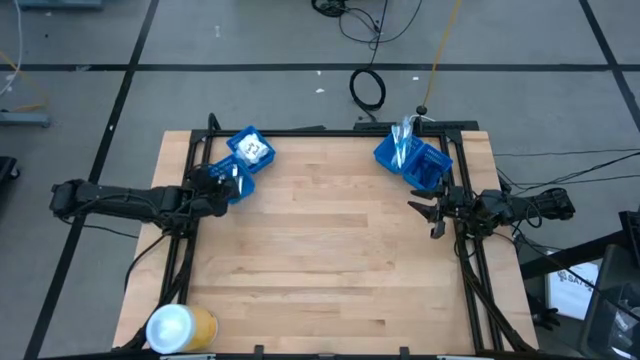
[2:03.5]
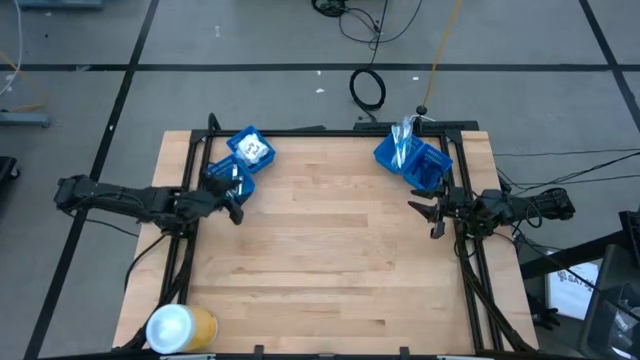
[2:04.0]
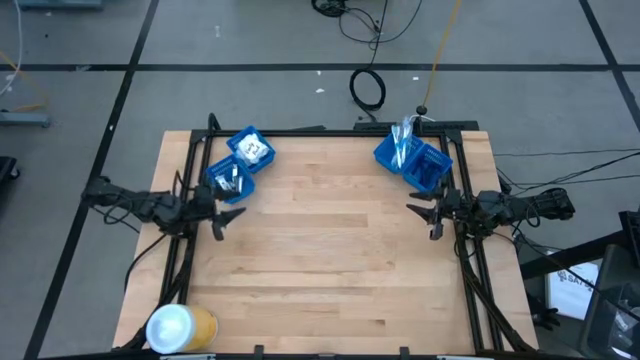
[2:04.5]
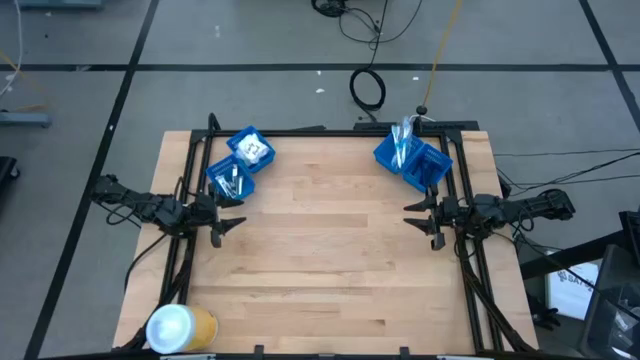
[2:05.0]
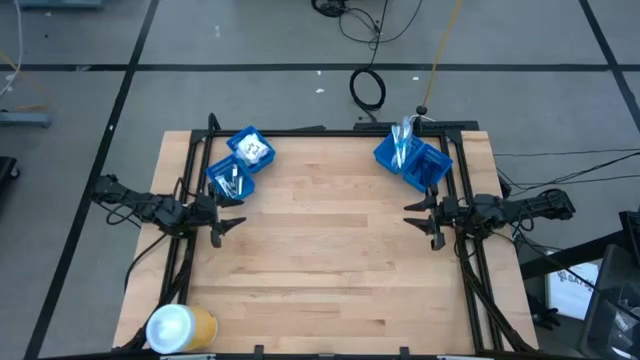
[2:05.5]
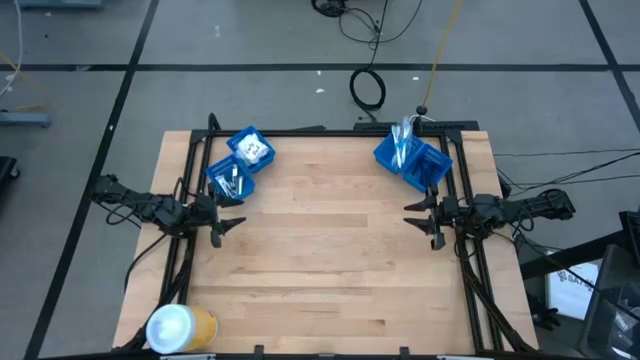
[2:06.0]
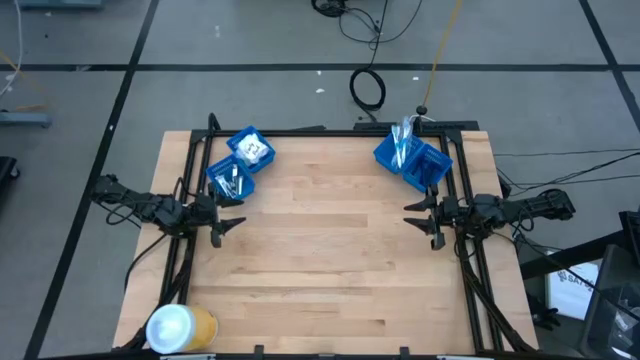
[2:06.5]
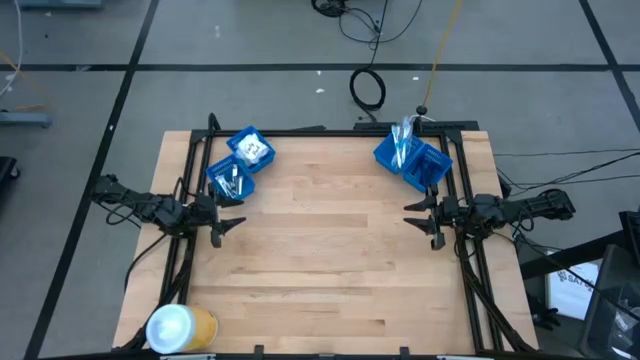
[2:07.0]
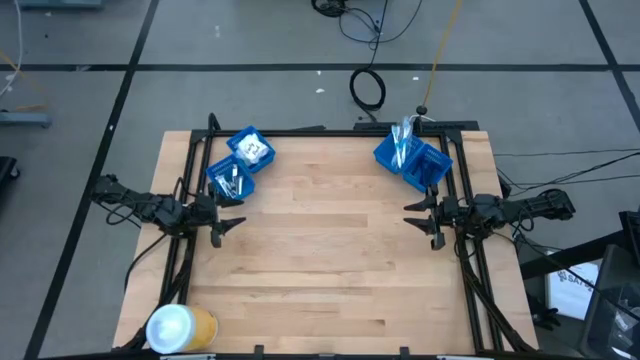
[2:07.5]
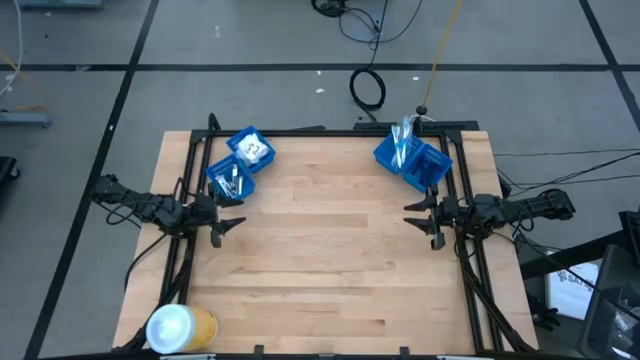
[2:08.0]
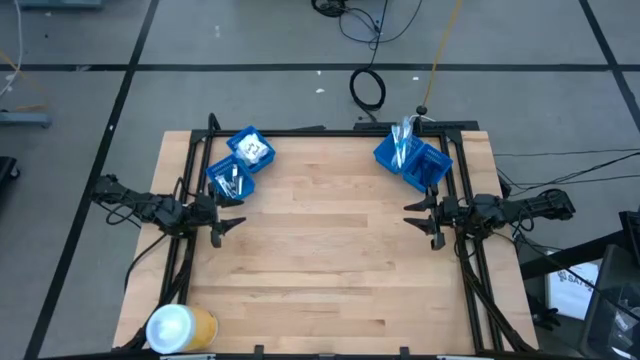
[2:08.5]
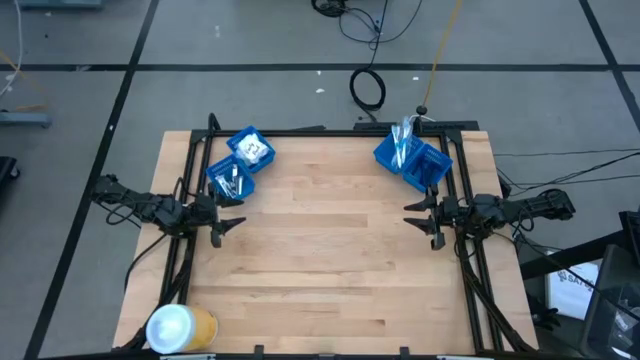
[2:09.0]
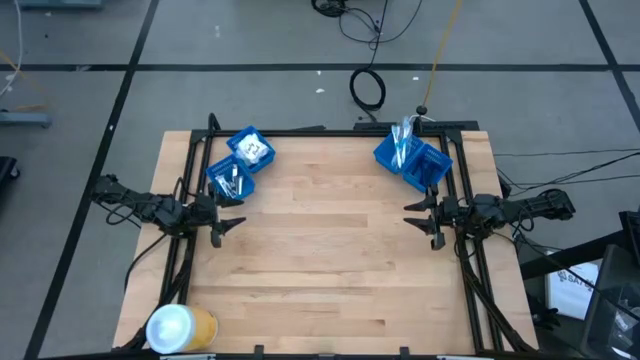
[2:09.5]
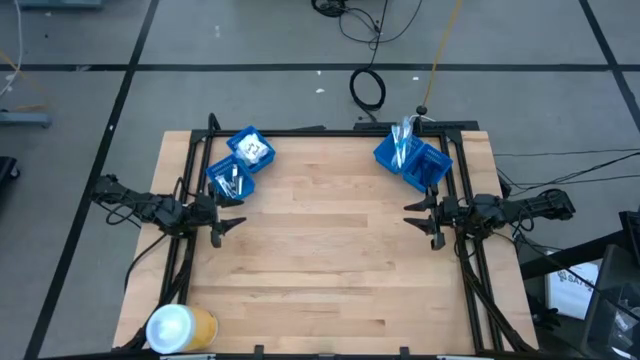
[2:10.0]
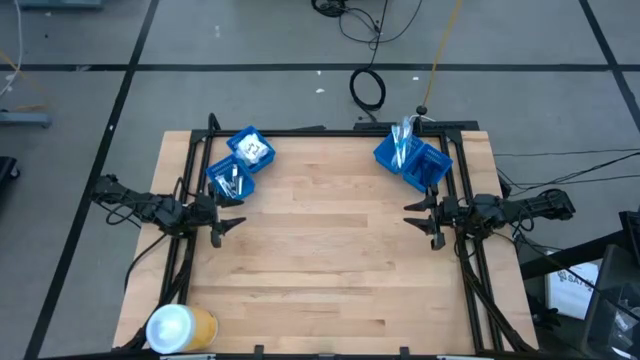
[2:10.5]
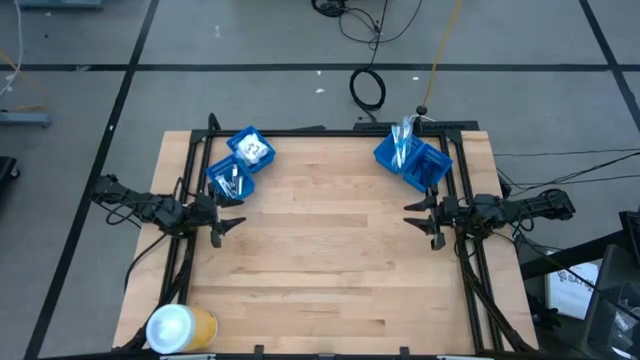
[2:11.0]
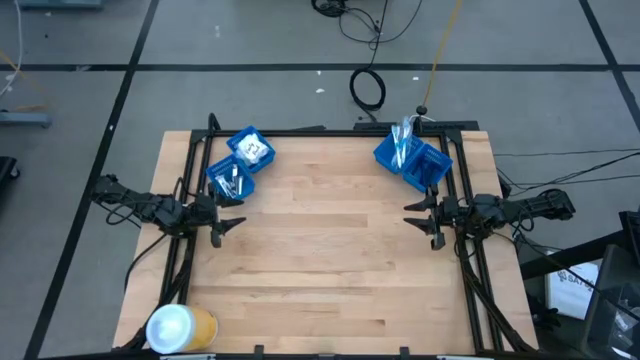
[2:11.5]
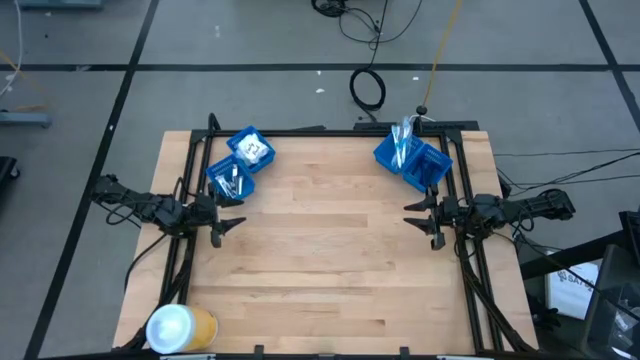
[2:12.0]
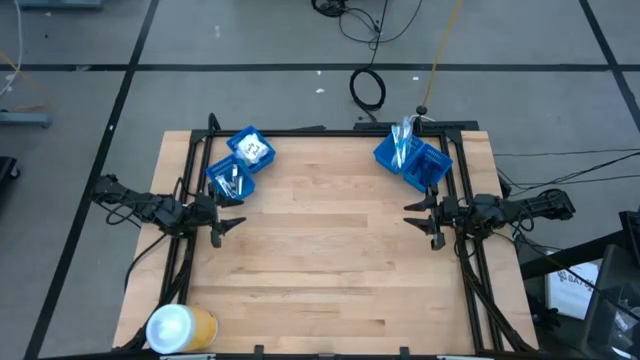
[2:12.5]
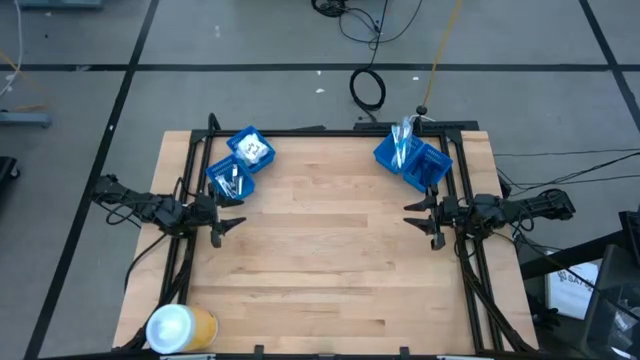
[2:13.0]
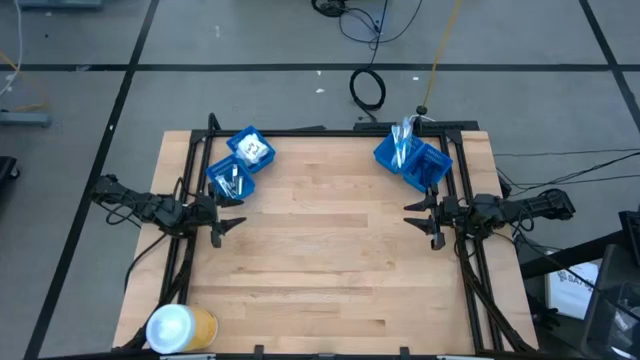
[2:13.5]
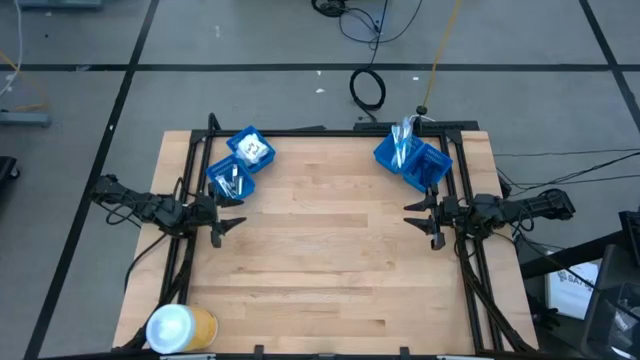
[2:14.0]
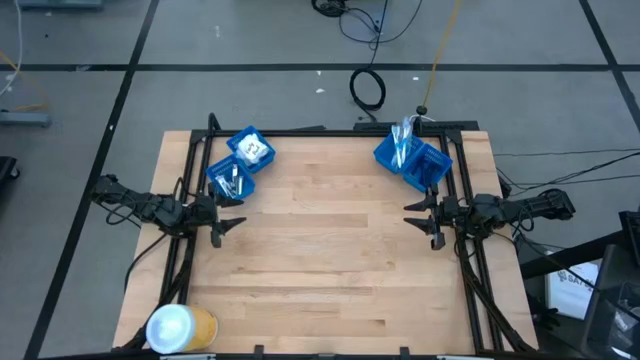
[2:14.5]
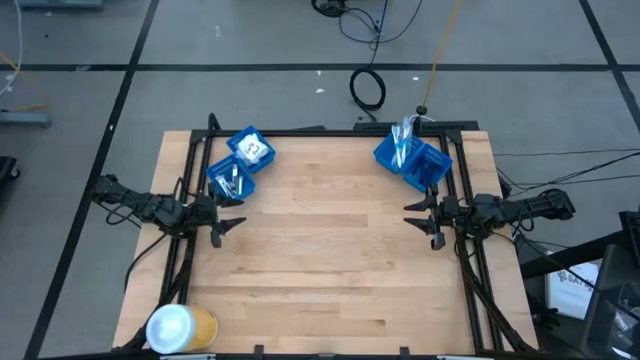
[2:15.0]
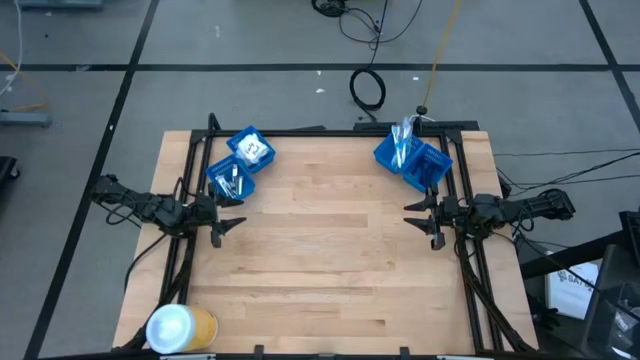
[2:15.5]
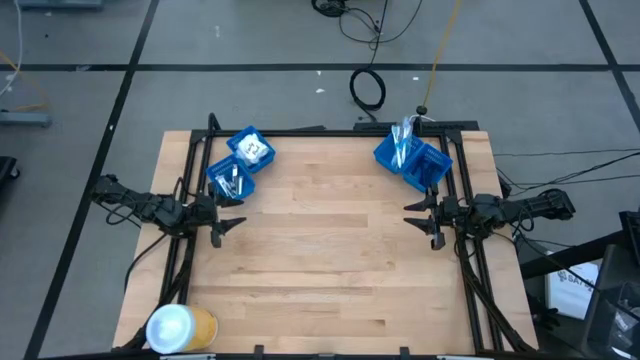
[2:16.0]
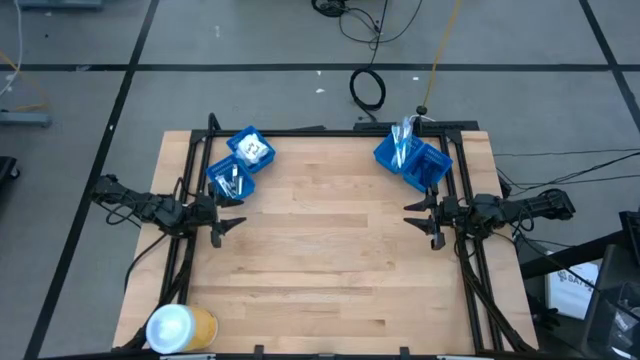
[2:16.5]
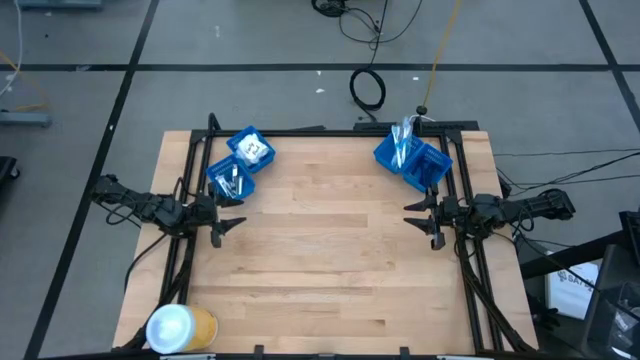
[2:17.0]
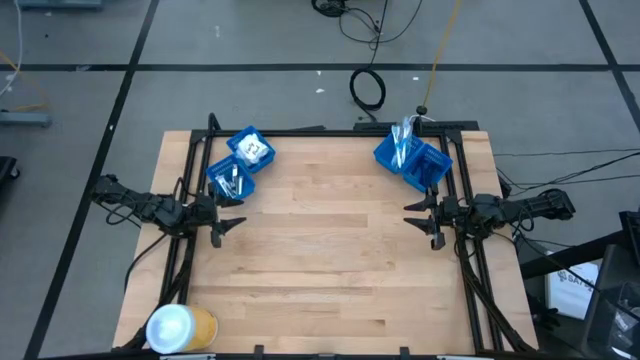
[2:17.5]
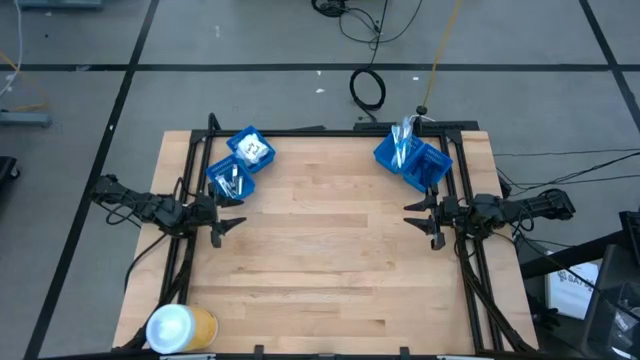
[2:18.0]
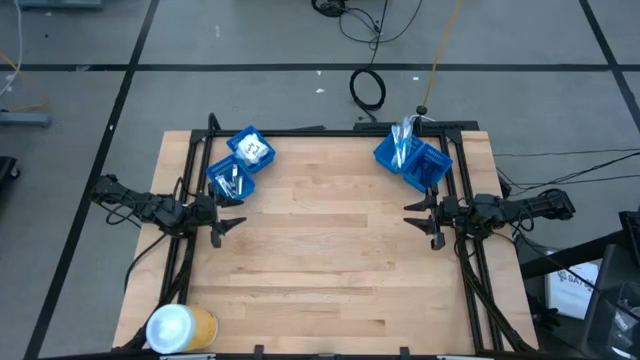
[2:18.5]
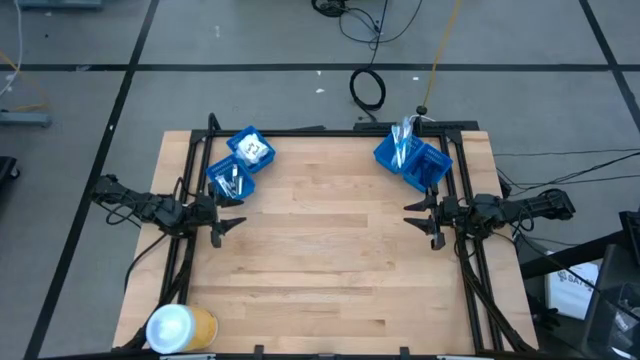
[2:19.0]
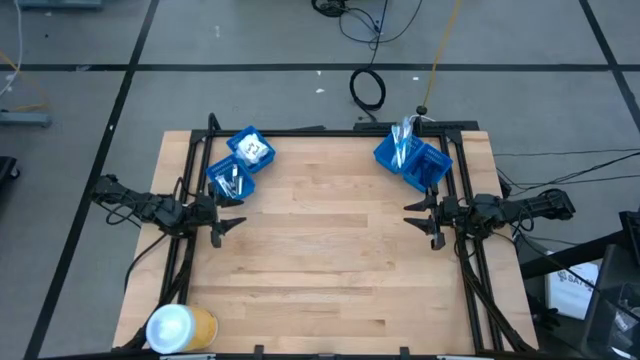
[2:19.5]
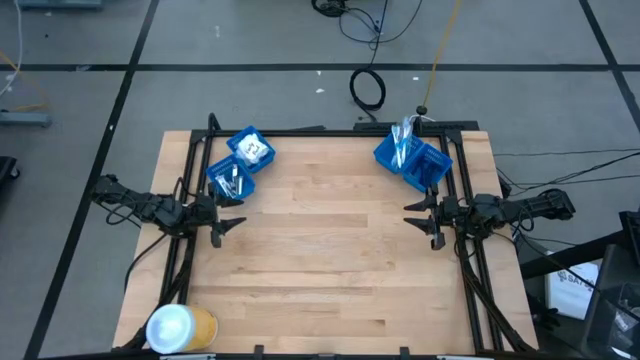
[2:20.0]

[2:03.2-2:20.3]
Task: Pick & Place Travel size toiletries
Return to Home Position

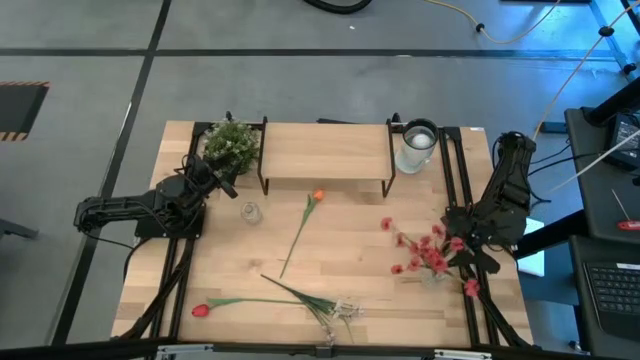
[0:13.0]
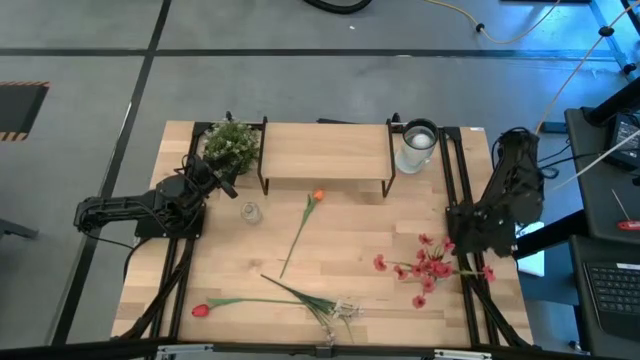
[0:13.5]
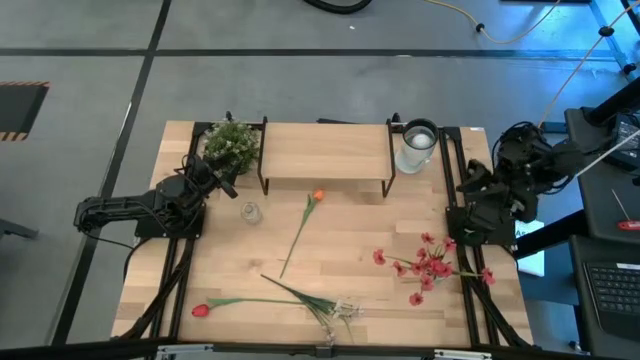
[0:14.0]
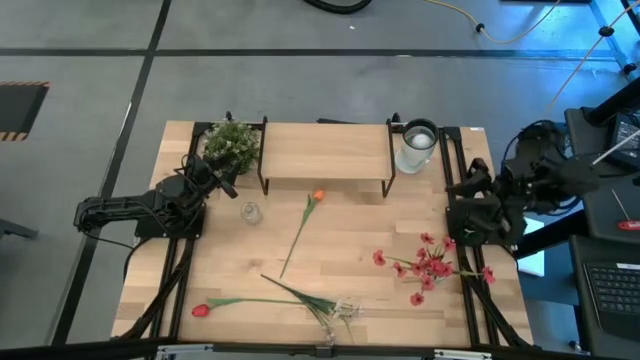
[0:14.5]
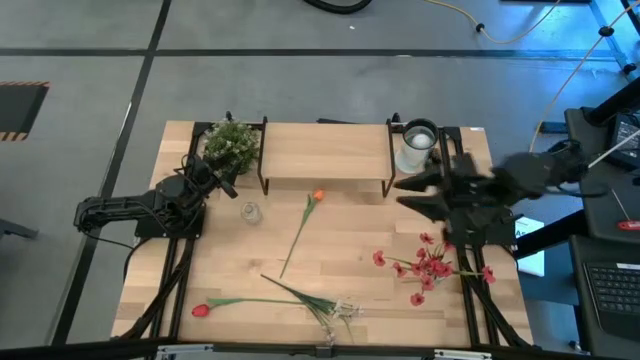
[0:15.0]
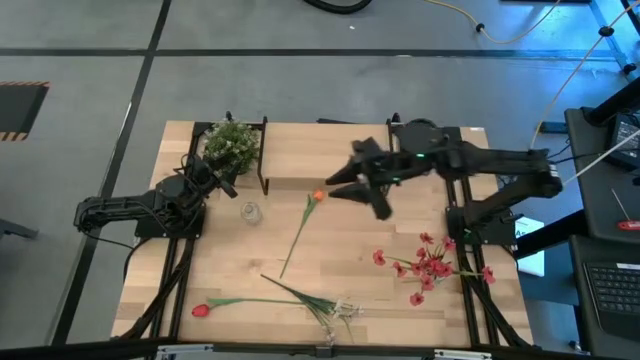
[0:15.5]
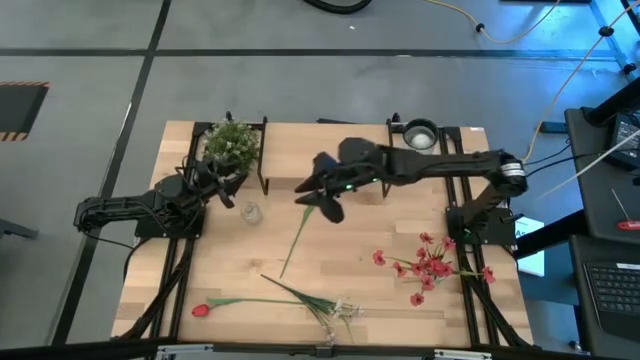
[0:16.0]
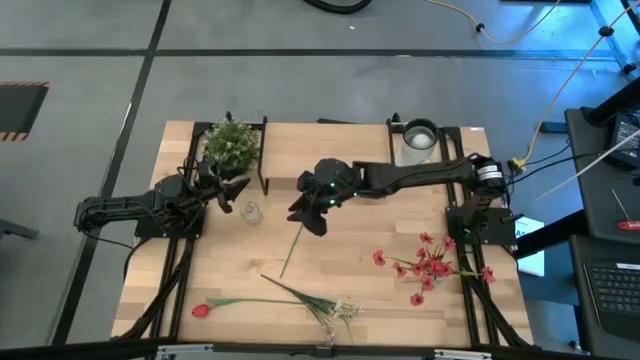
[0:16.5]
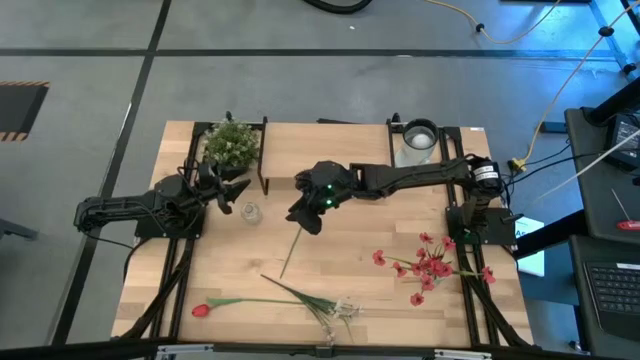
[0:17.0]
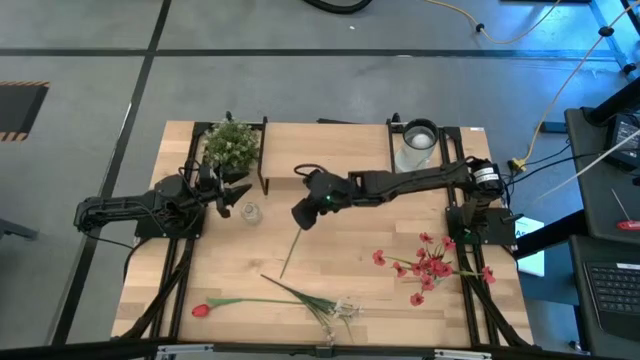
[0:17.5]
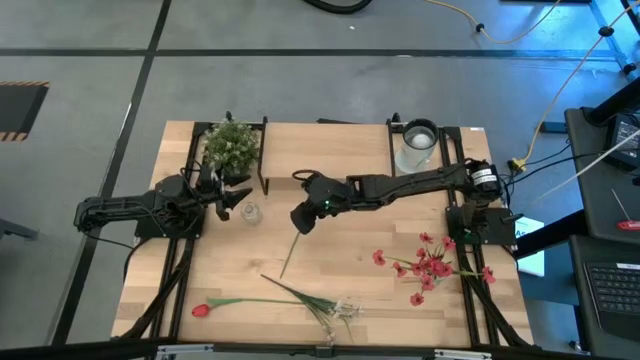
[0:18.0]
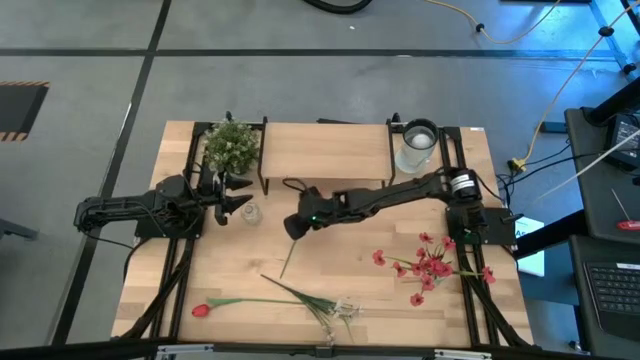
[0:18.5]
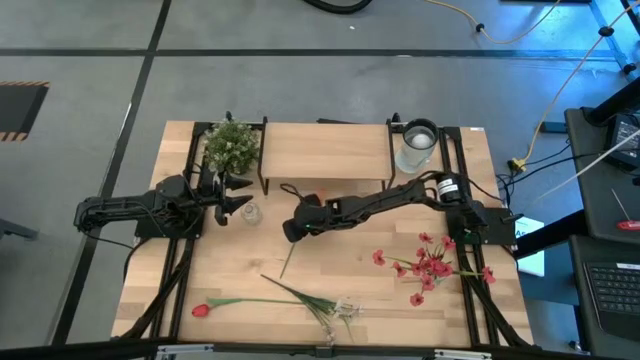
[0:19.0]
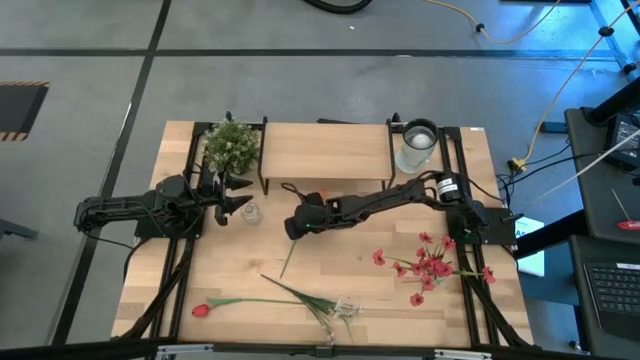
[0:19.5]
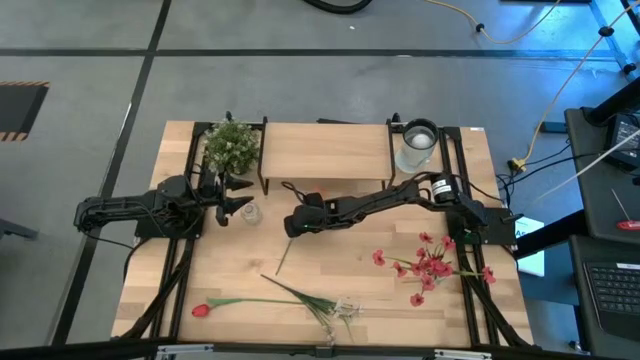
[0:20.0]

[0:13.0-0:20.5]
Task: Pick and place flowers into a vace then onto a shelf
Put the orange flower into the bottom transparent vase
